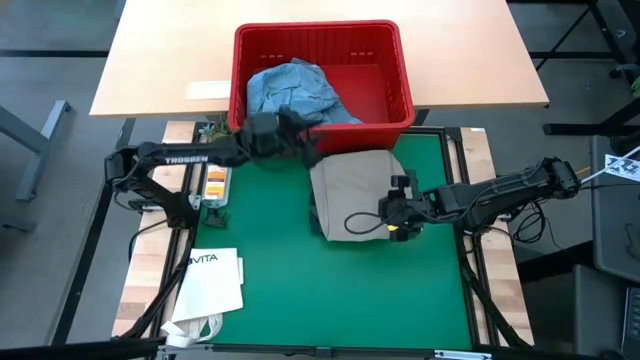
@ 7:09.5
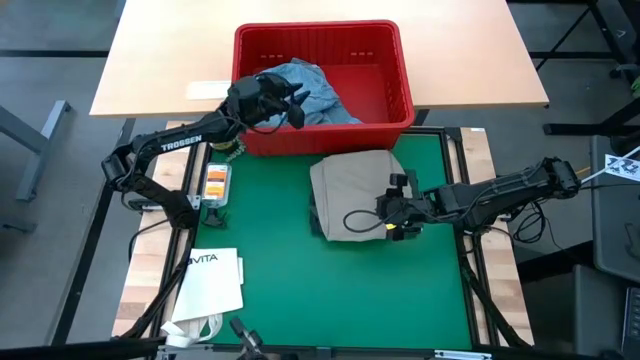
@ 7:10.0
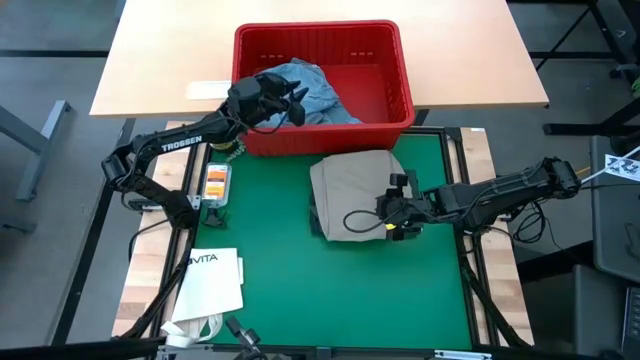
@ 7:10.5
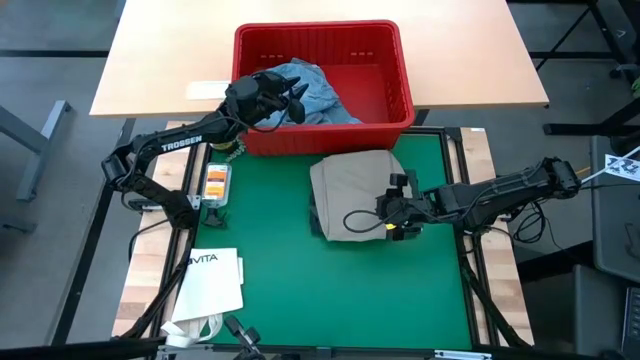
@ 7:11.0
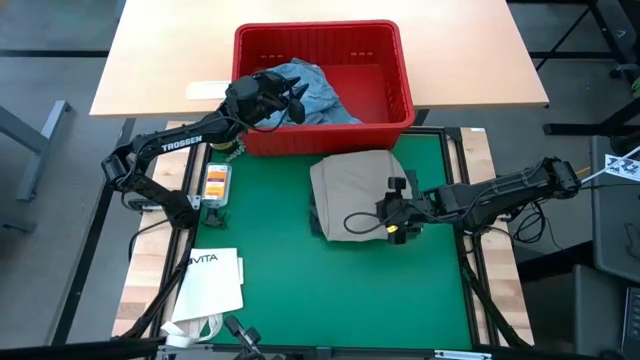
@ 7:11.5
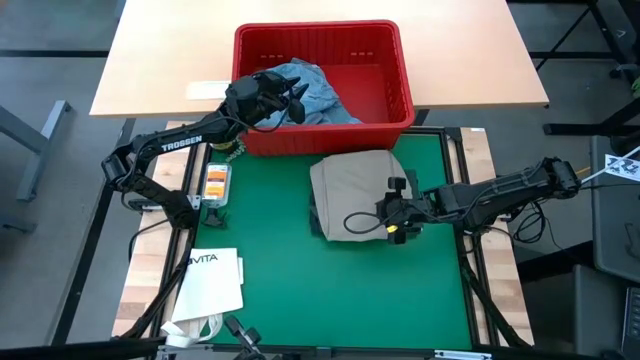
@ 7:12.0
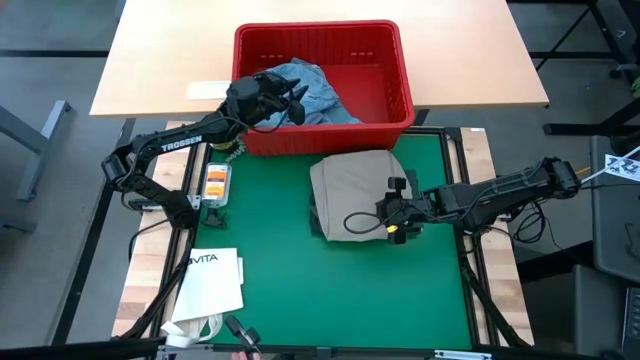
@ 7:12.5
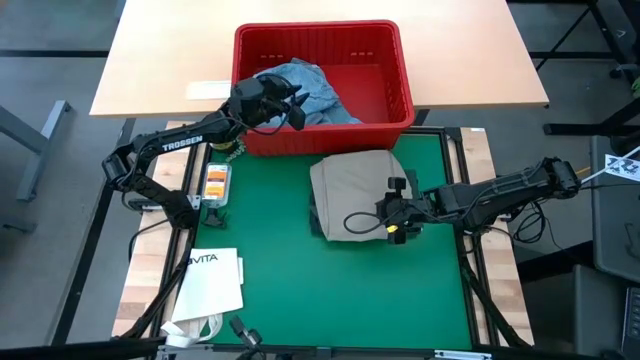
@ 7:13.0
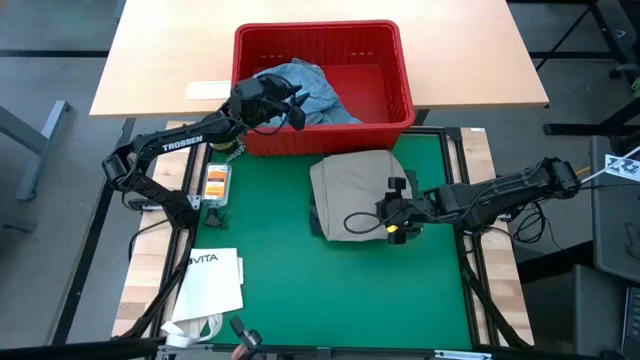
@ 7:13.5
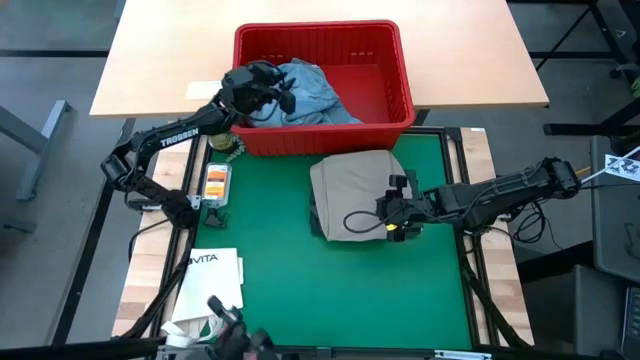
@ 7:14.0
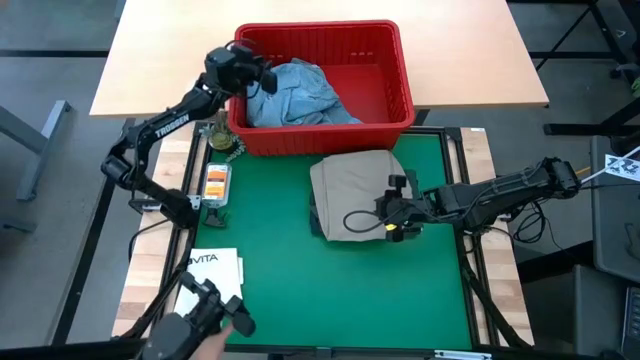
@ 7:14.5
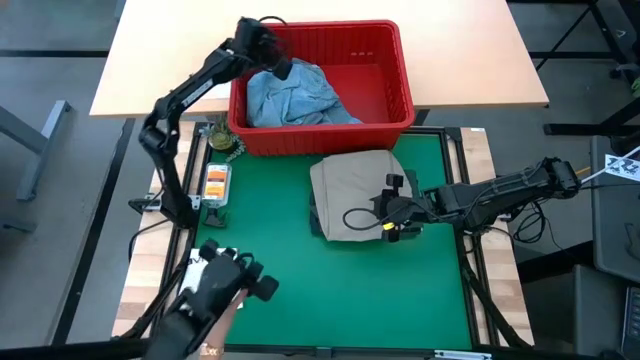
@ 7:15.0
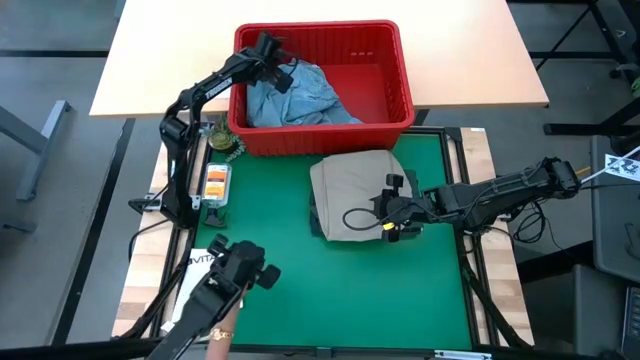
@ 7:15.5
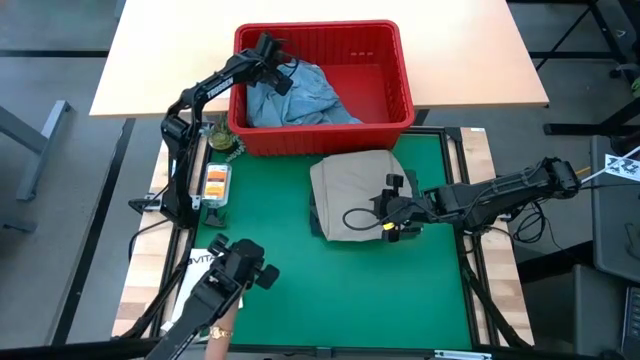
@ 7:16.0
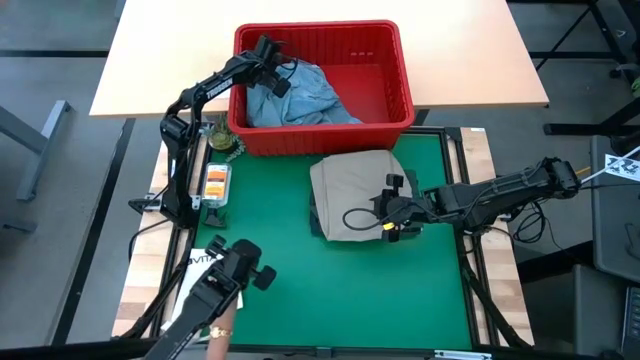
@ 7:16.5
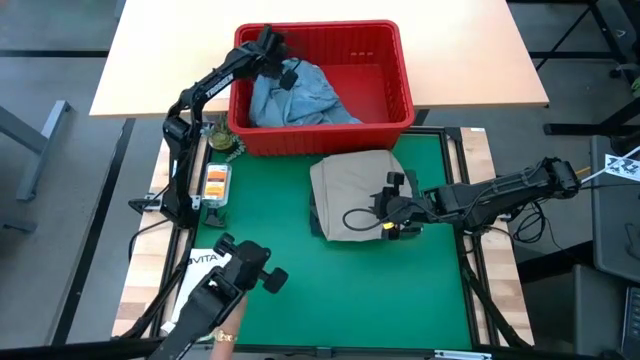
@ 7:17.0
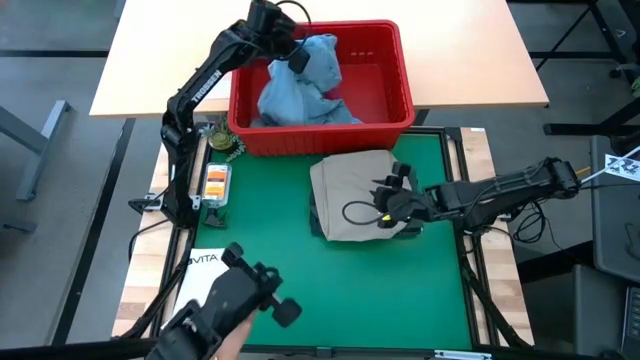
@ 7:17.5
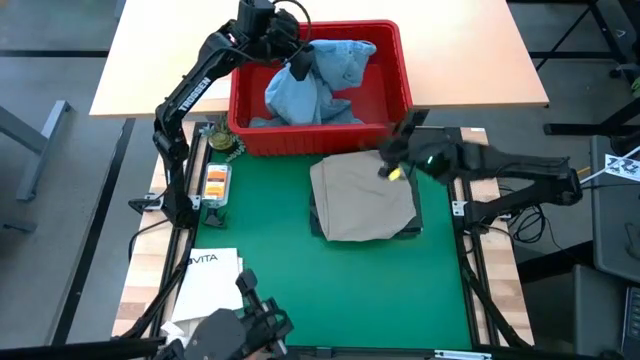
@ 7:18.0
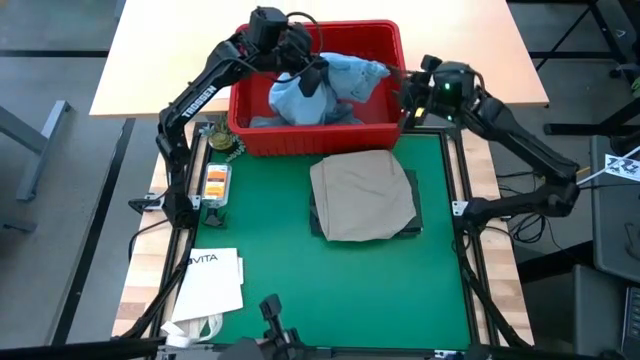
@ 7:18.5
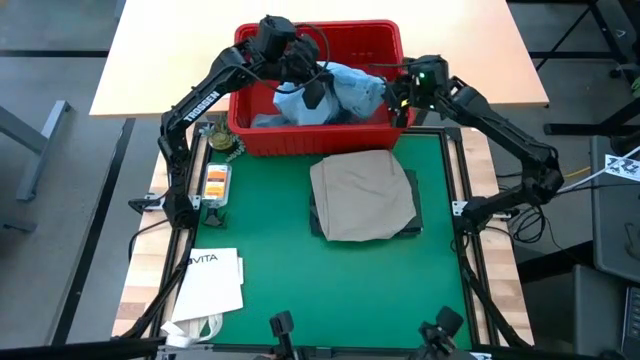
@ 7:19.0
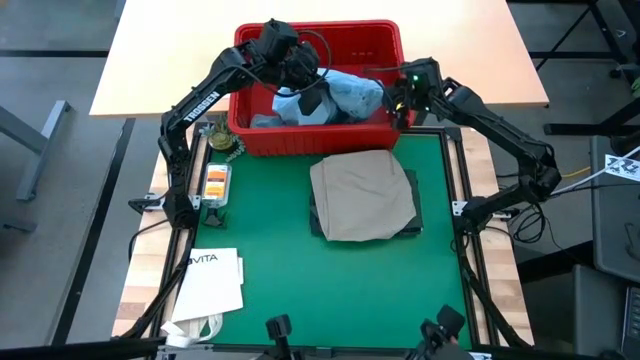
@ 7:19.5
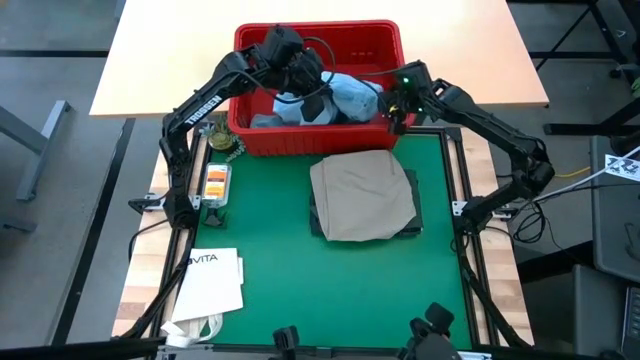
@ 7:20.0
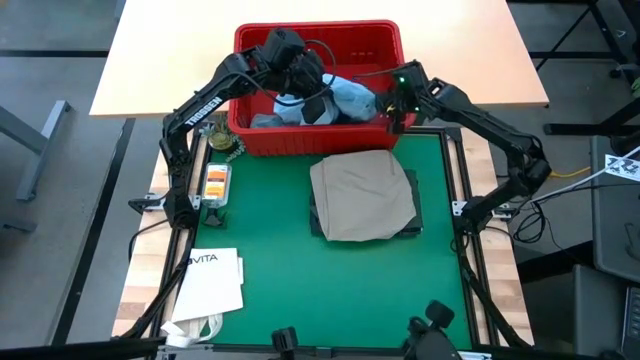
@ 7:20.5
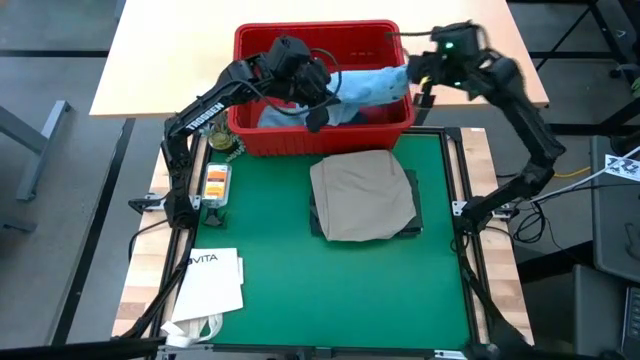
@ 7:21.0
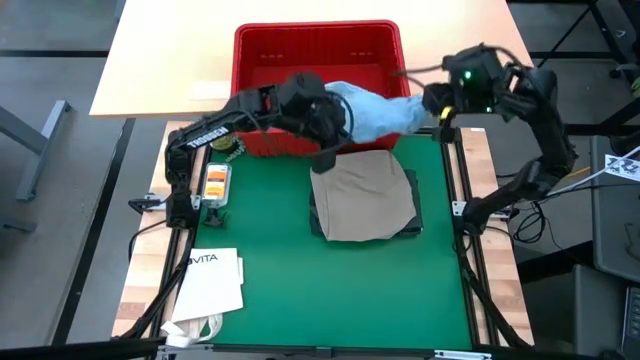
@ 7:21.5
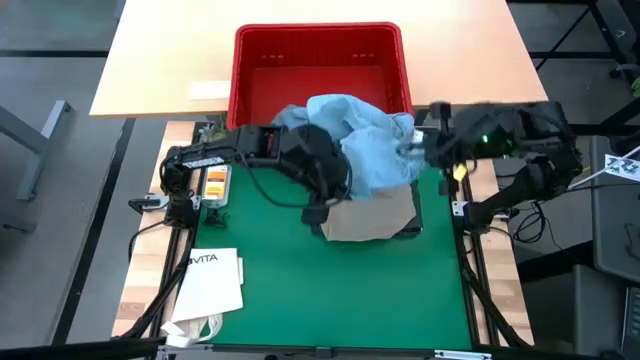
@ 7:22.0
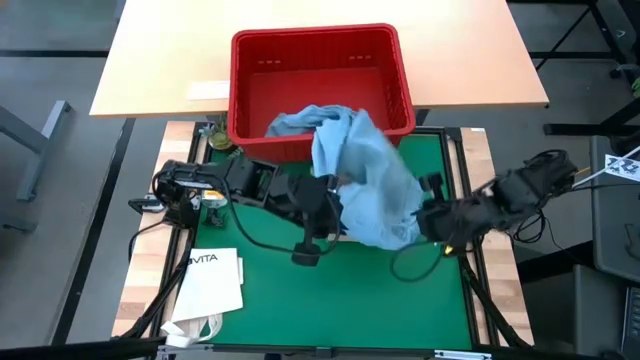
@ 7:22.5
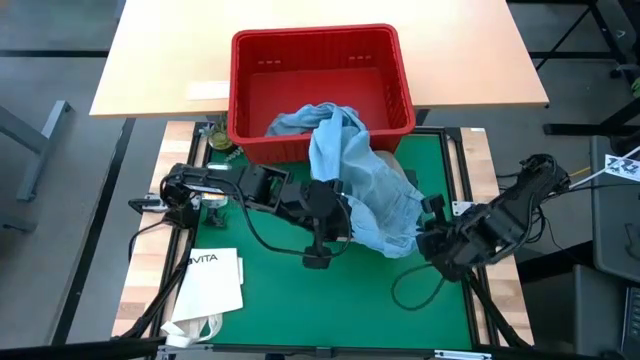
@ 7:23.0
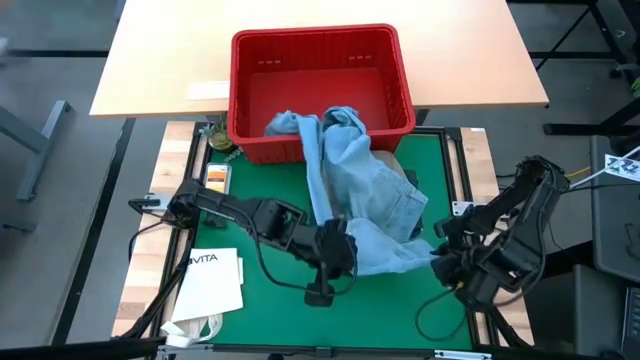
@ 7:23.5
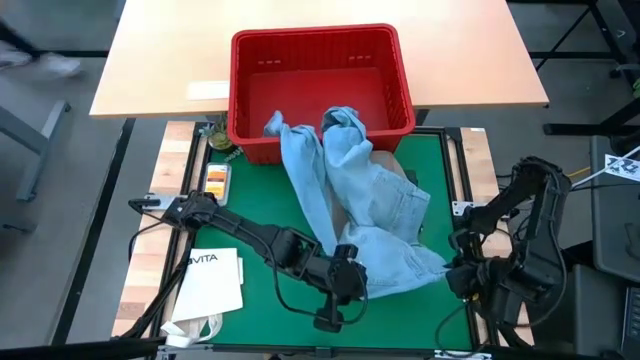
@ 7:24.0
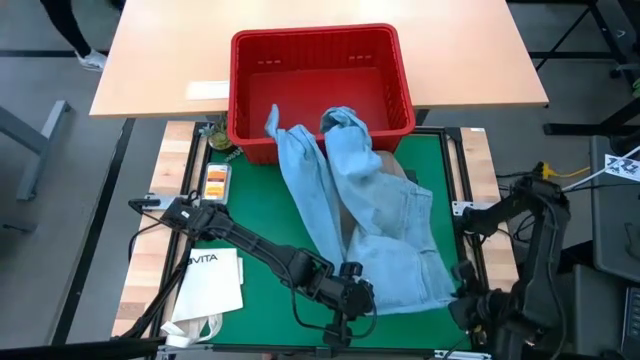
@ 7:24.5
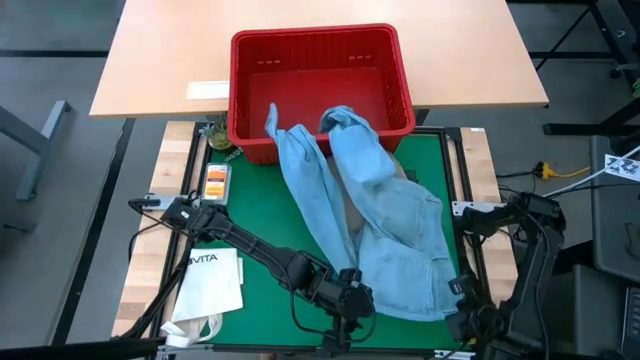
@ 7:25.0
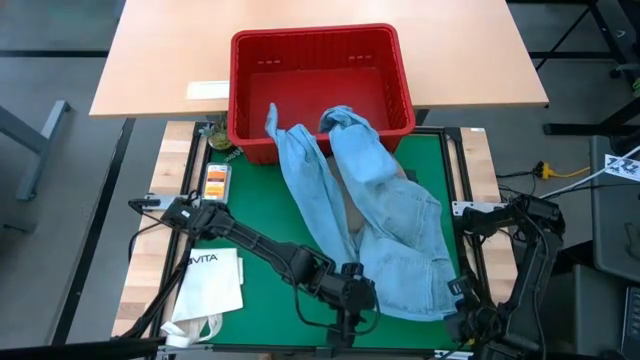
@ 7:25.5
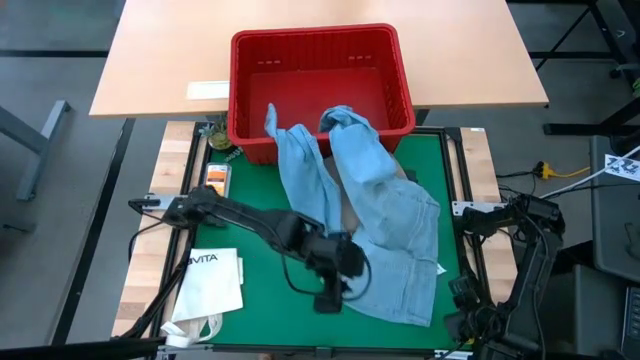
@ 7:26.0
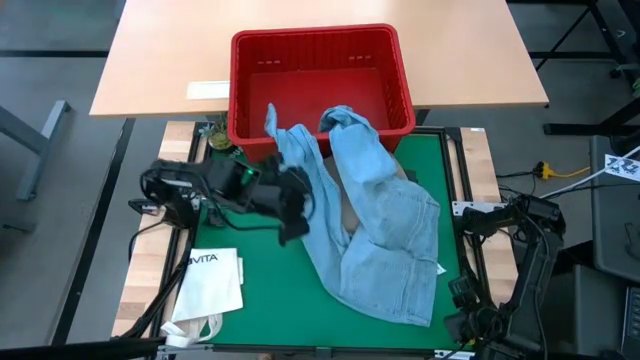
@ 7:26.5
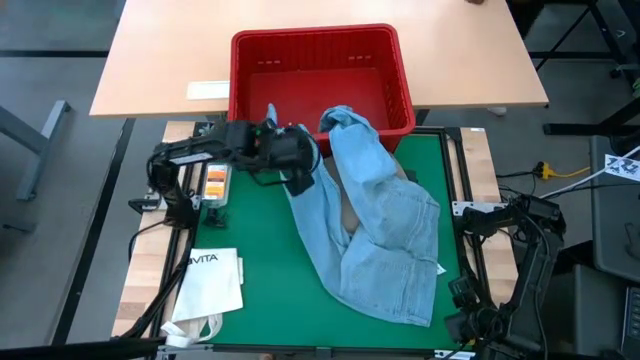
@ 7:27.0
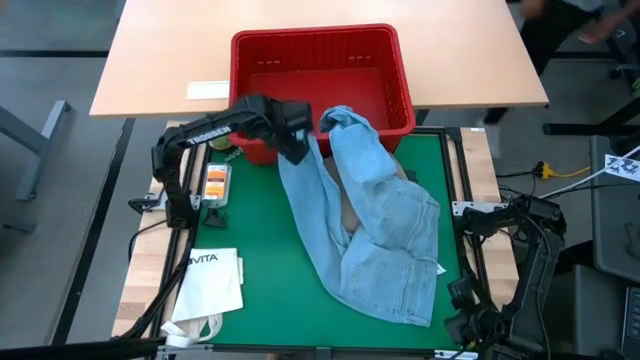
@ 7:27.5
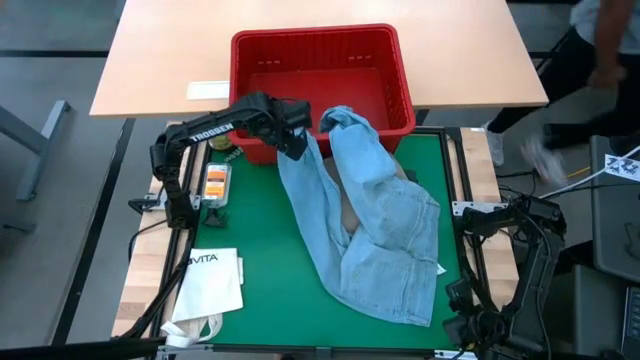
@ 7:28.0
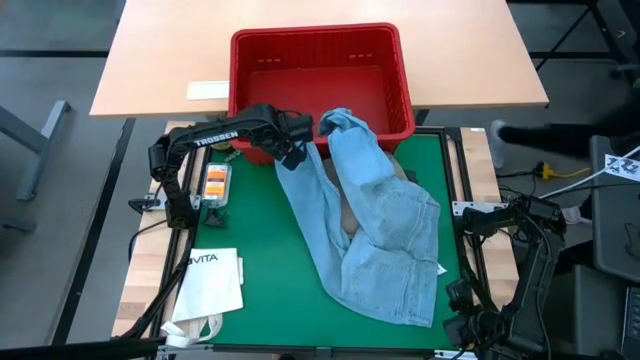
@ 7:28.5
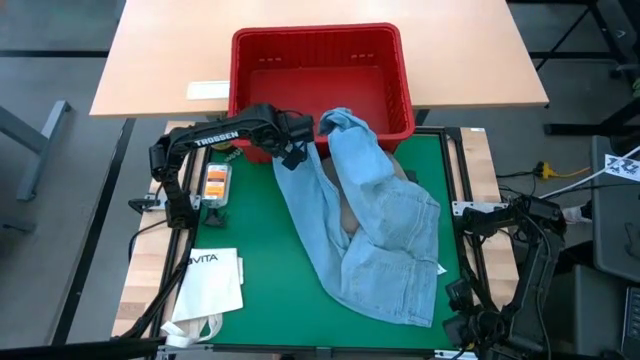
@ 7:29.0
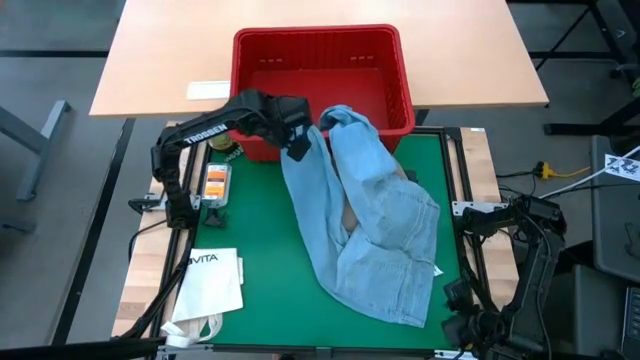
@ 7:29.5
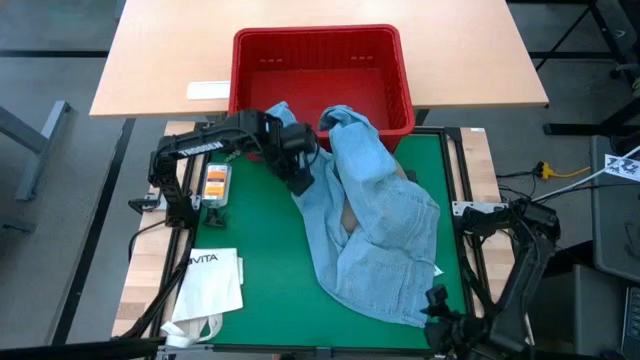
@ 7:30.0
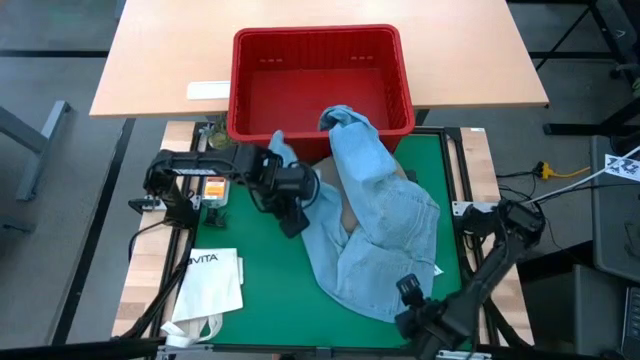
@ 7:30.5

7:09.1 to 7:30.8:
Task: Fold Laundry from Bin
Fold the light blue pants
